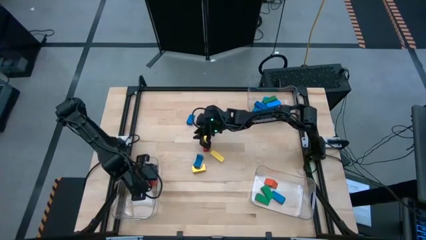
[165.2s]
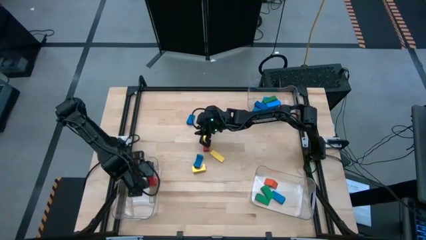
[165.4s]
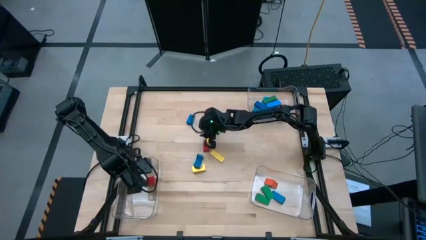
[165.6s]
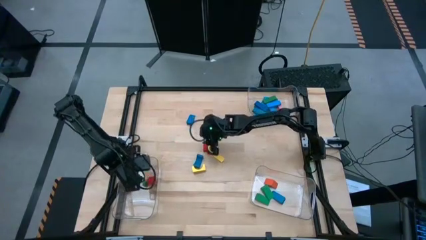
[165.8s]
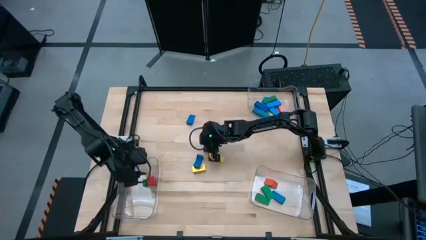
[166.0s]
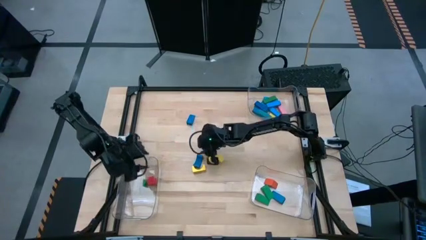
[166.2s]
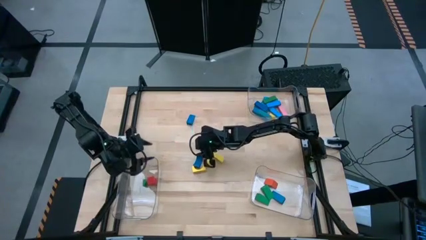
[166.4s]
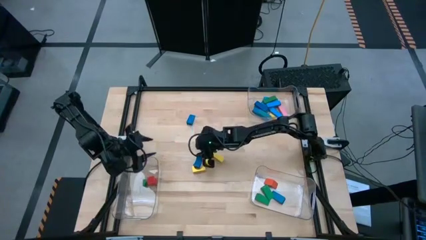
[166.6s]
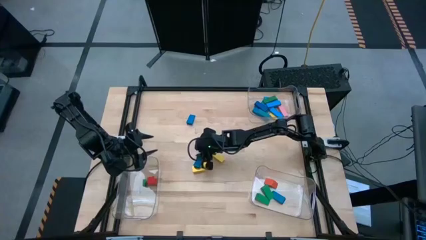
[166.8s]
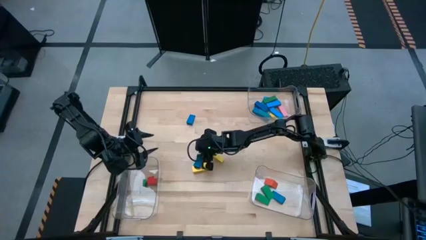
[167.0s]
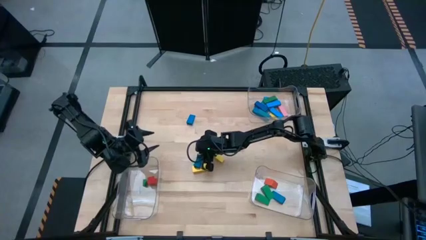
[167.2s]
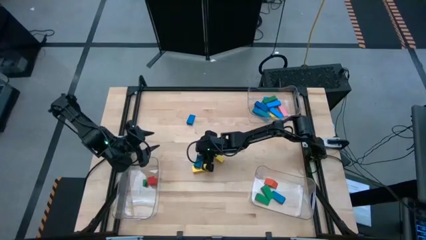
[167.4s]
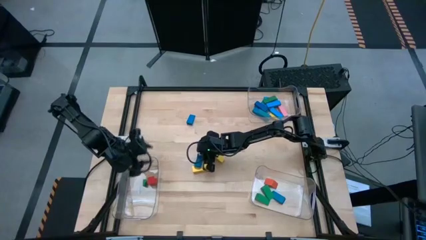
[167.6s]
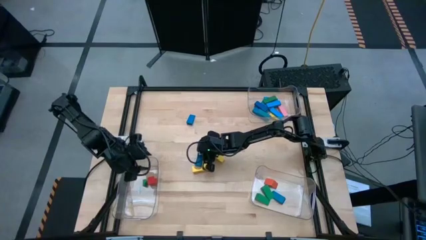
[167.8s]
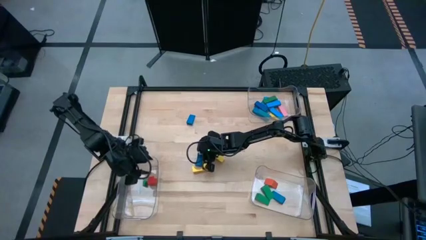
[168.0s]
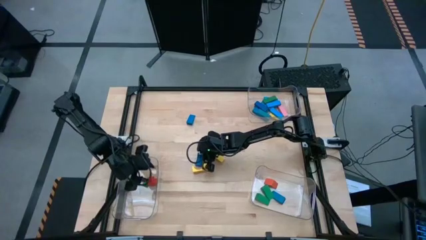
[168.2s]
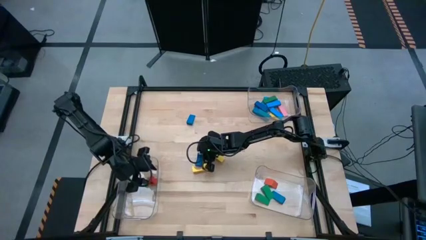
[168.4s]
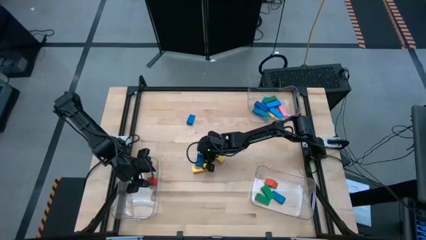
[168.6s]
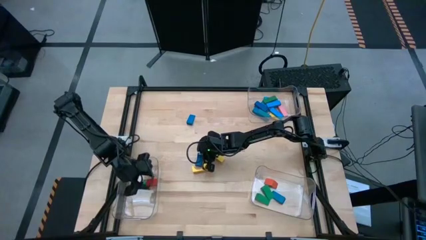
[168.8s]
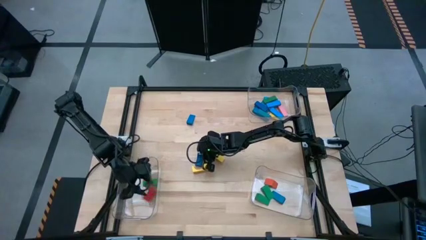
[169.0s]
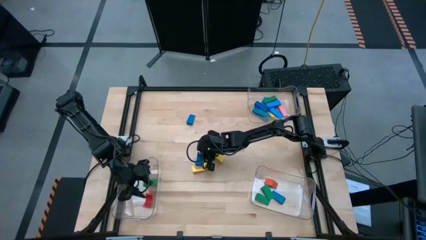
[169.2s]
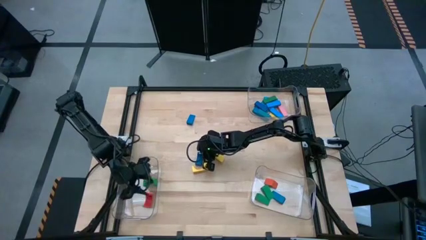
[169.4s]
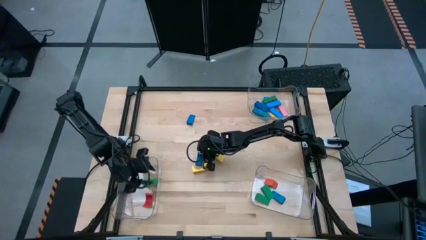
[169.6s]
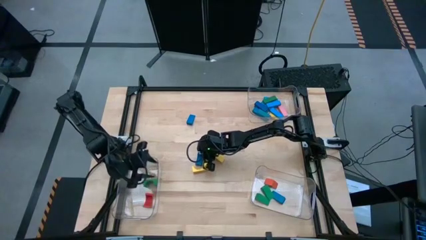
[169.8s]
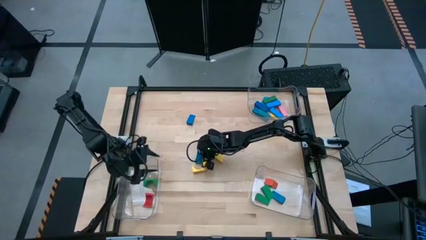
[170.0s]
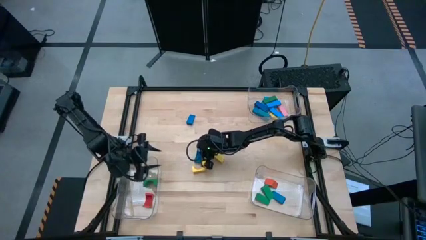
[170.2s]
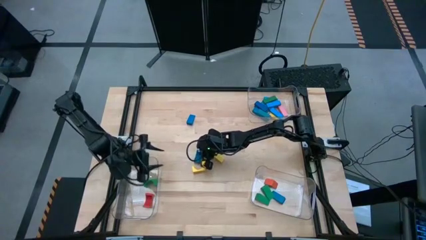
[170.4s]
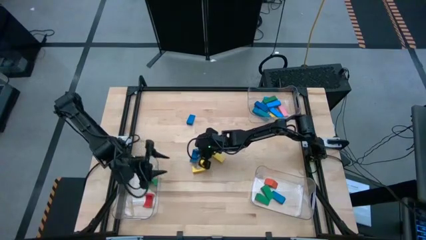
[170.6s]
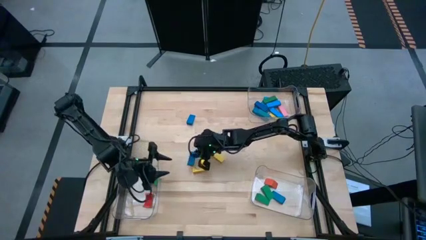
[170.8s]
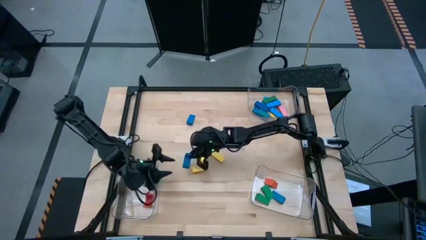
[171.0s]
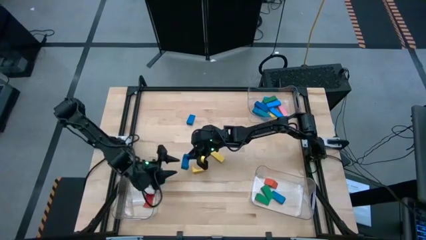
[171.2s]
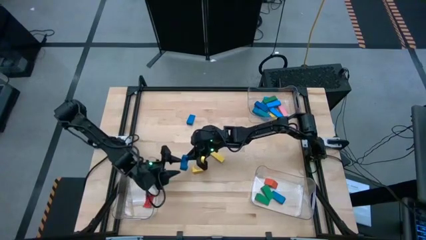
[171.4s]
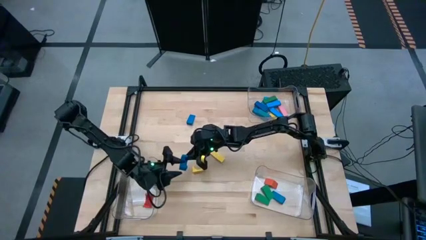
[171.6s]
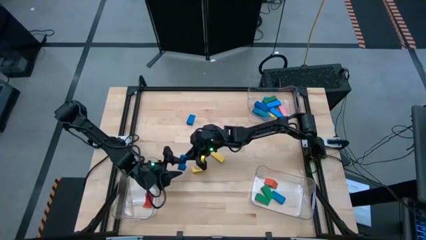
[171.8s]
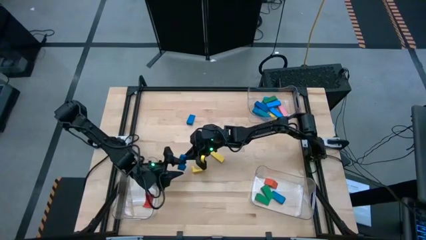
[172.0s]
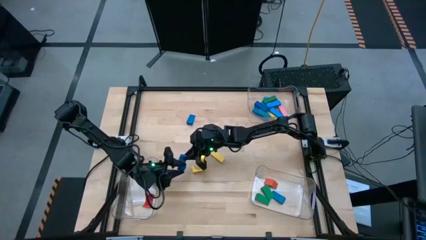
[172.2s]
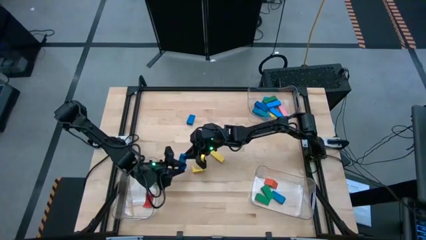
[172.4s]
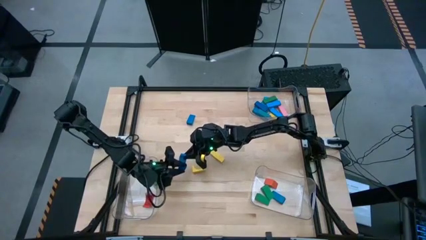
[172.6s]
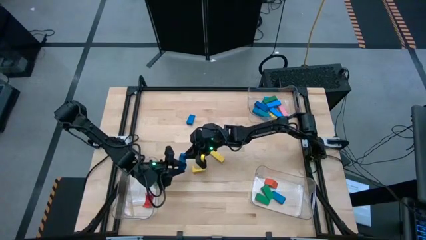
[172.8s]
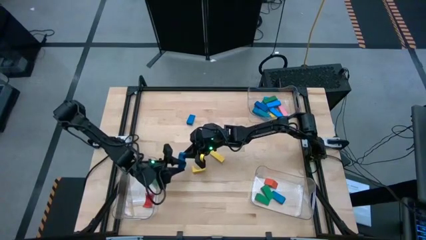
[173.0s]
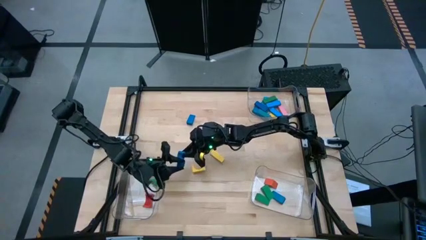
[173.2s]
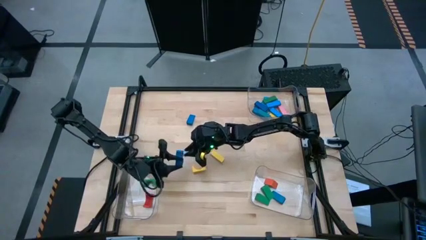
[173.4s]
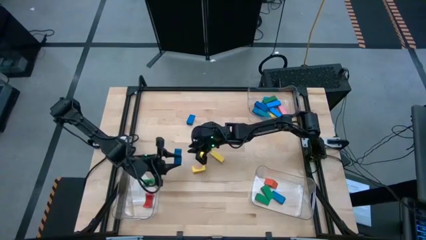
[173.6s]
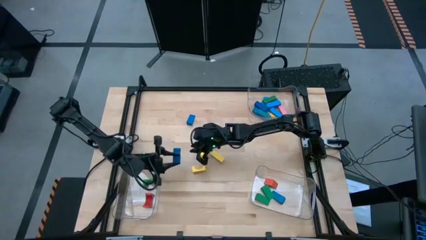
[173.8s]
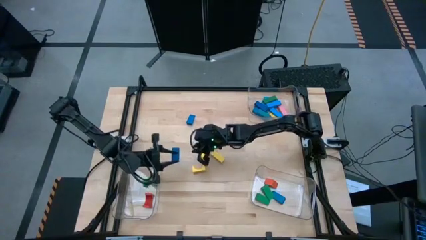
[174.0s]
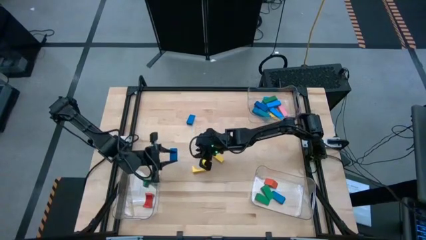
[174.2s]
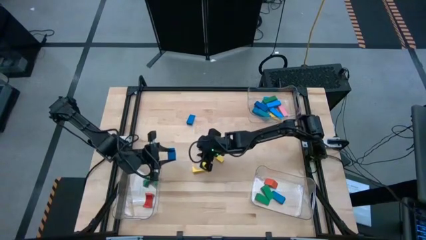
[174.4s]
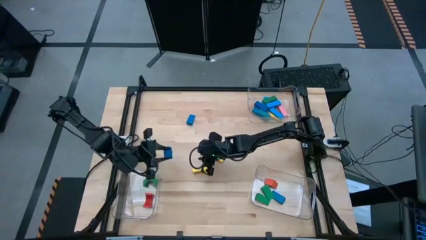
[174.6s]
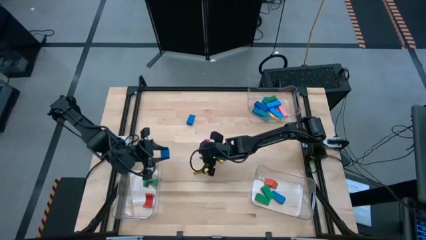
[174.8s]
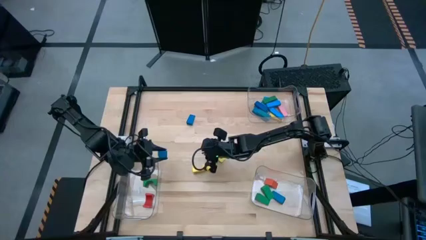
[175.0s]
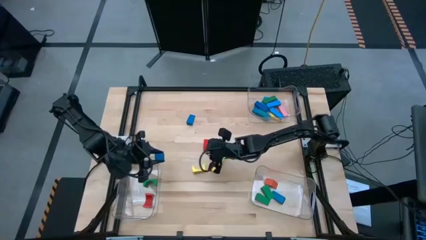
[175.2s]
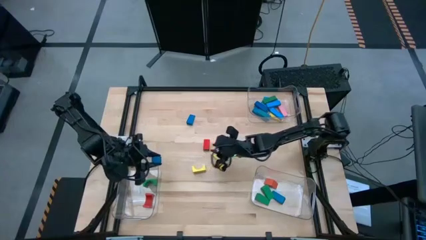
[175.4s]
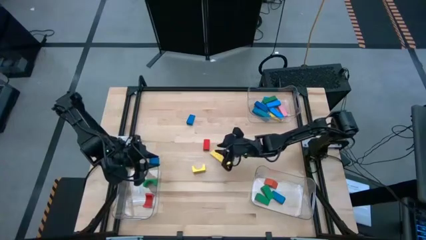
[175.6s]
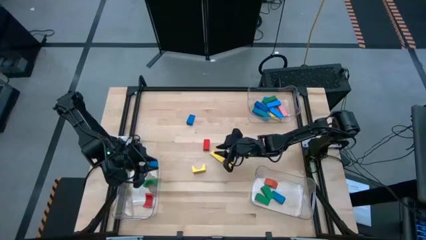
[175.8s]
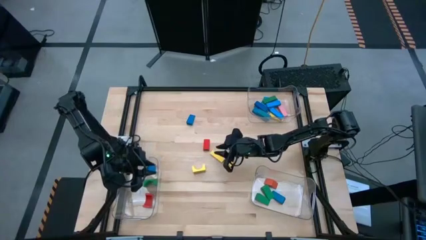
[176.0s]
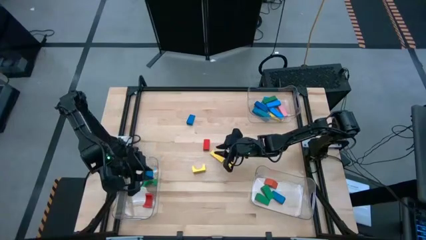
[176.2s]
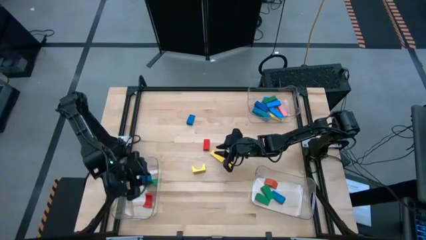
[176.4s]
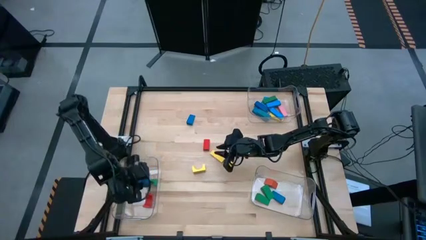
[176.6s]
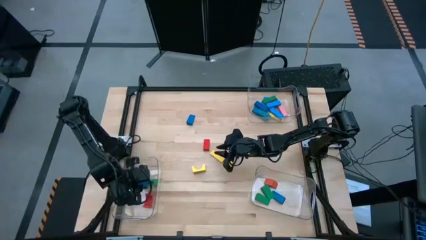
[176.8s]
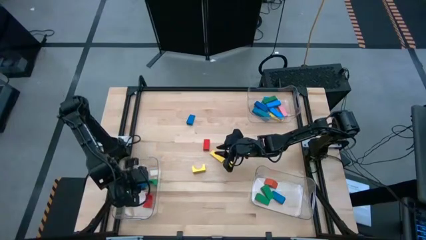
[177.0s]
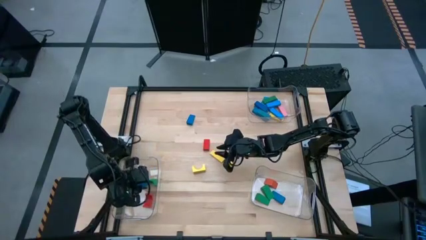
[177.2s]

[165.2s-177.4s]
Task: Sort blocks by size
Put the blue arch block into the bottom left transparent bin
